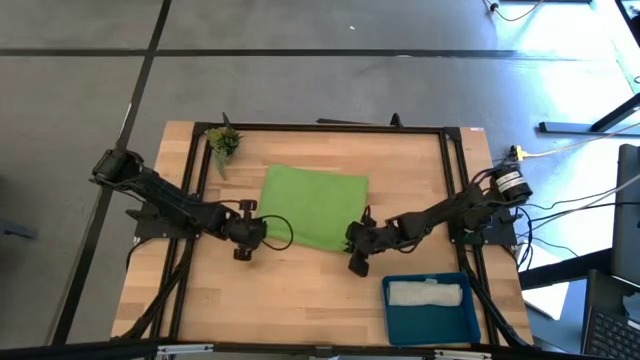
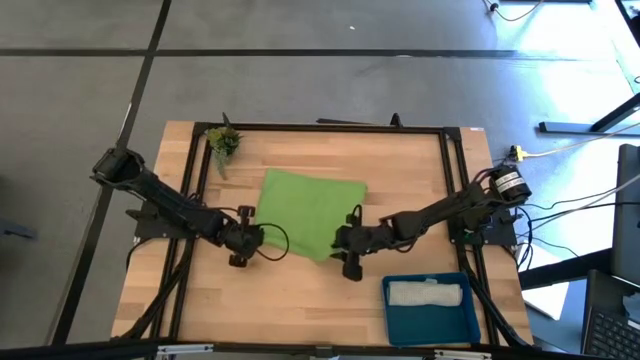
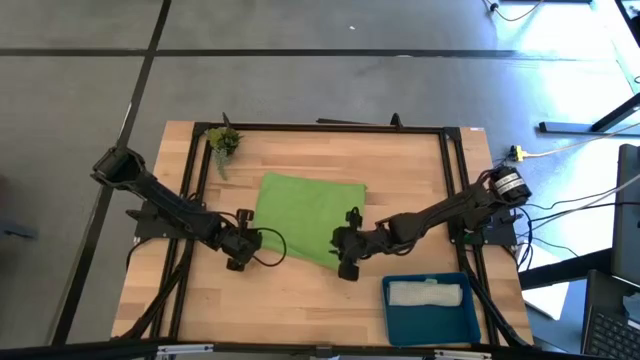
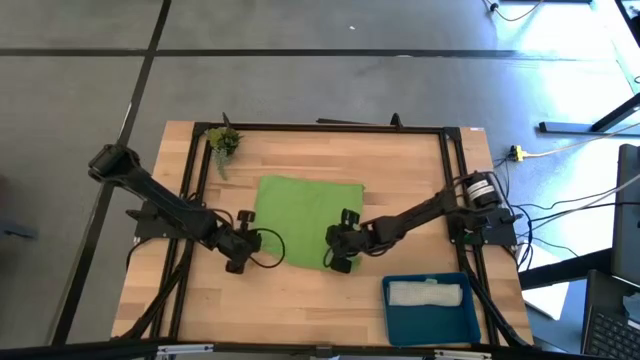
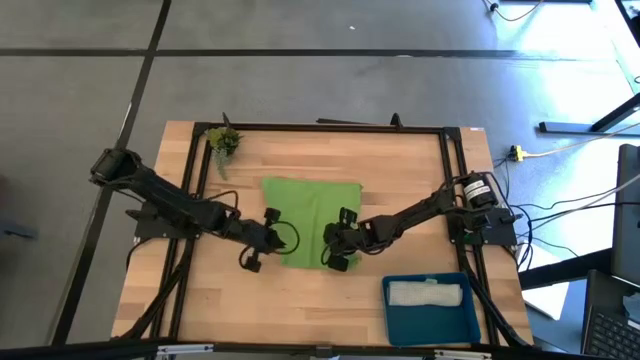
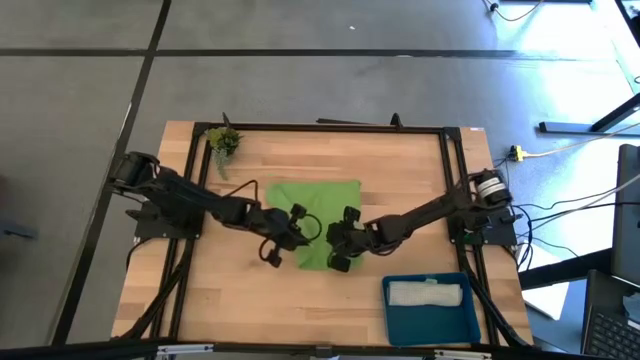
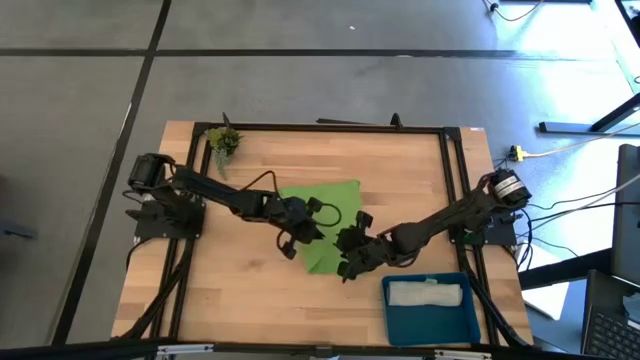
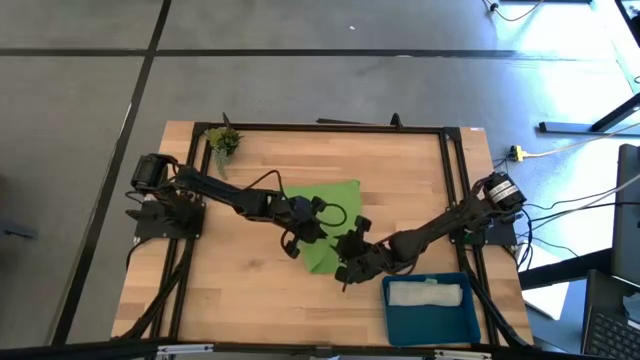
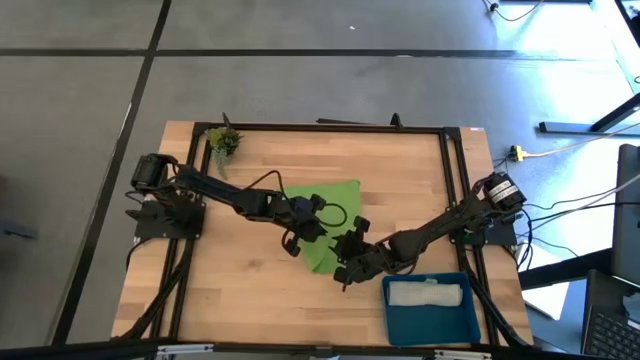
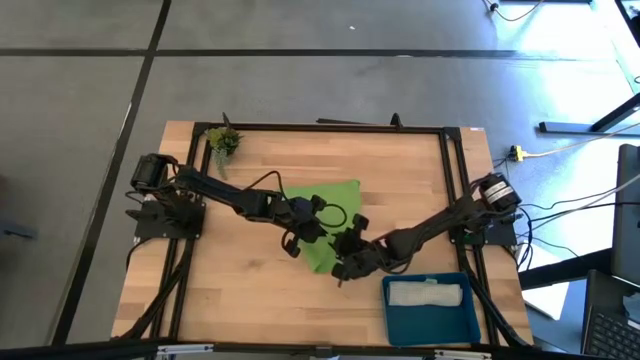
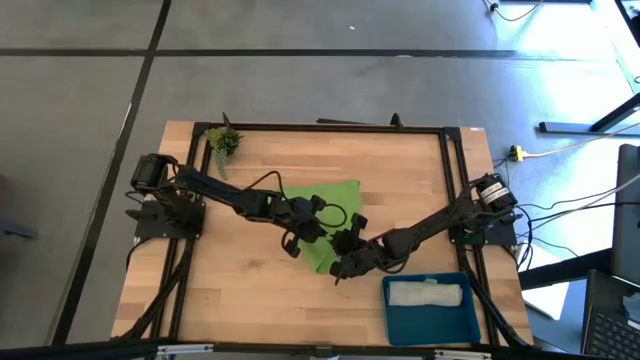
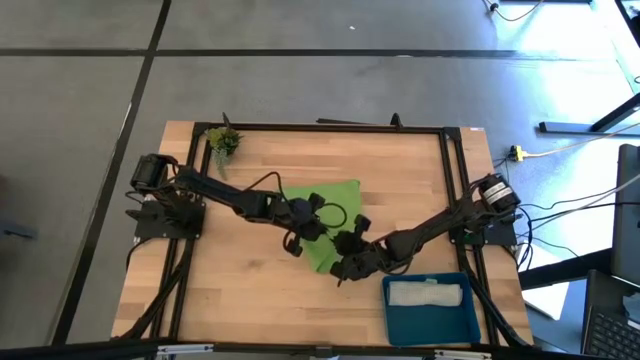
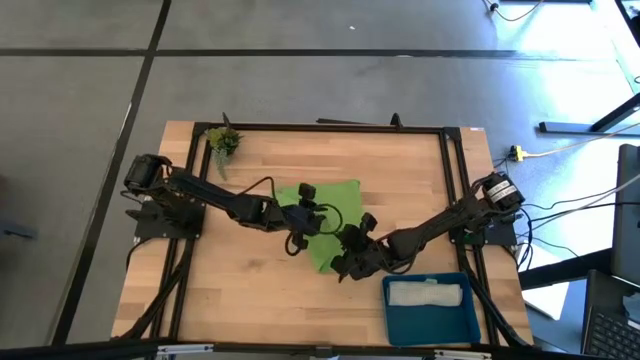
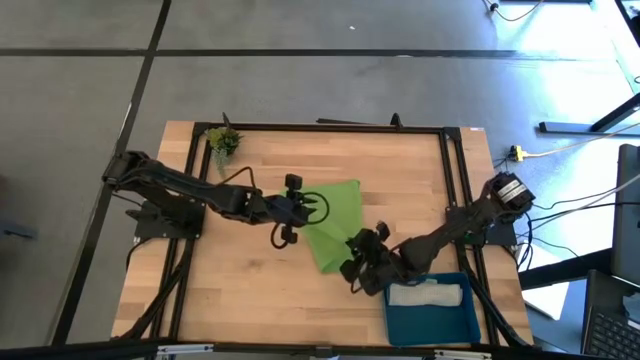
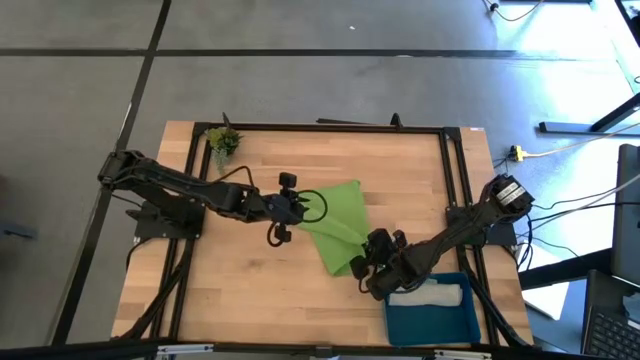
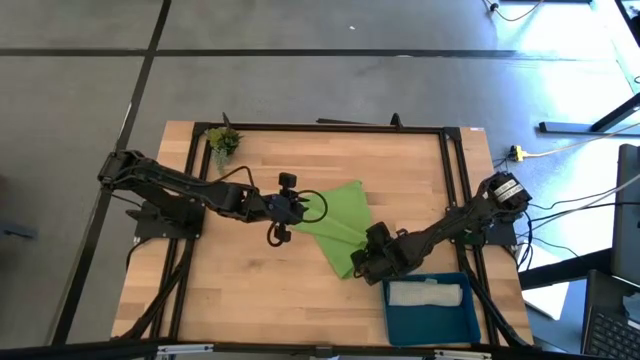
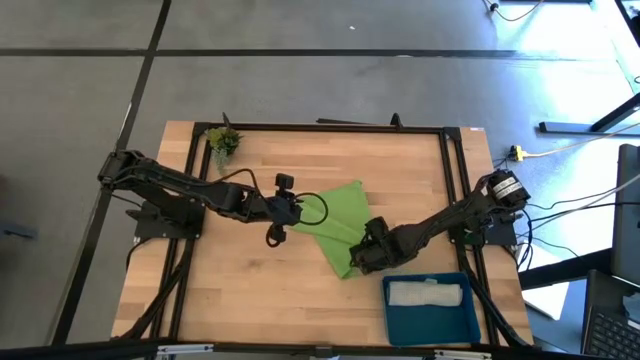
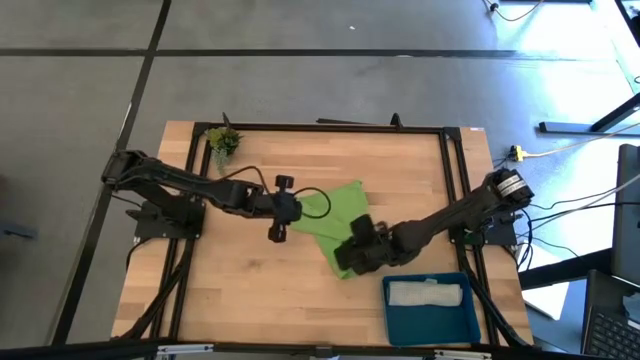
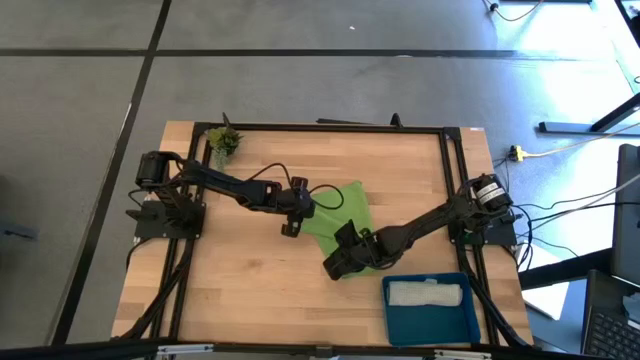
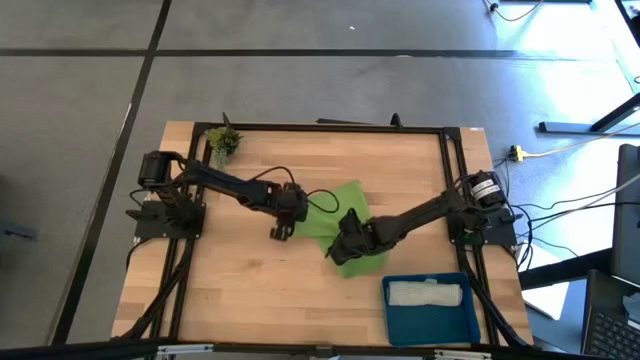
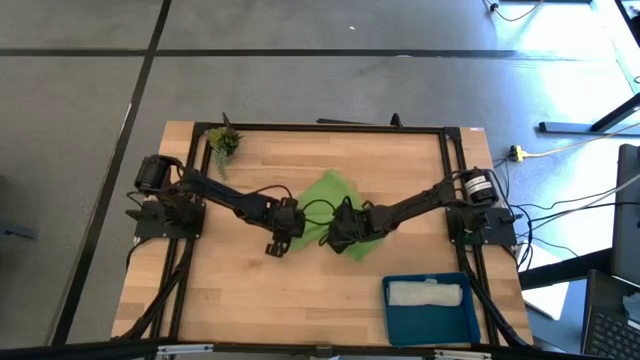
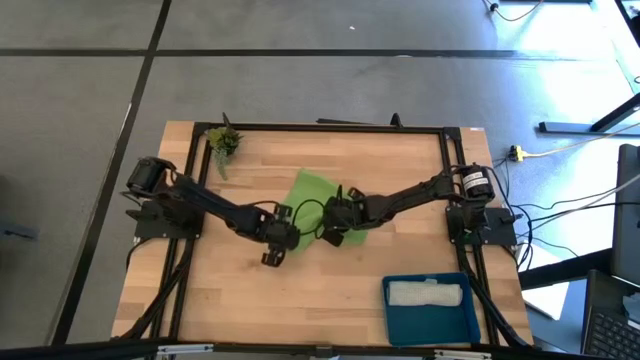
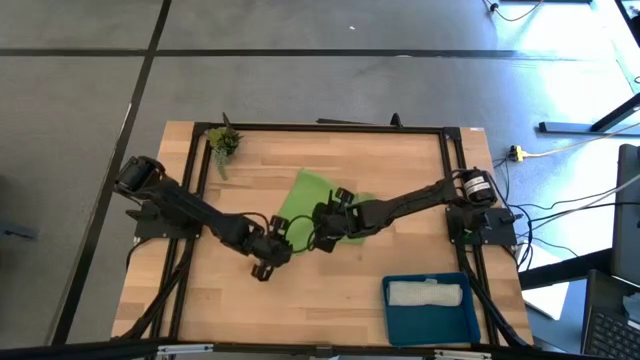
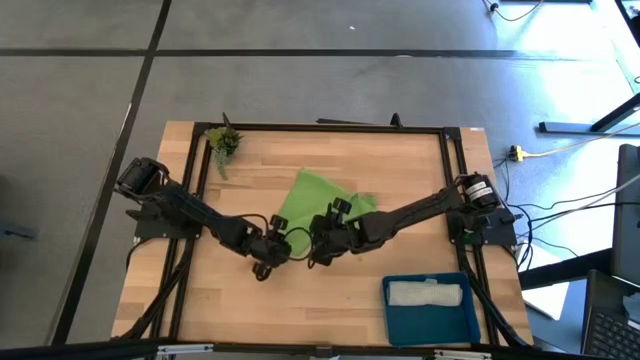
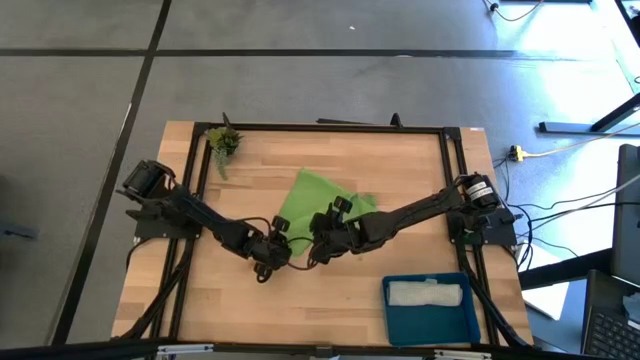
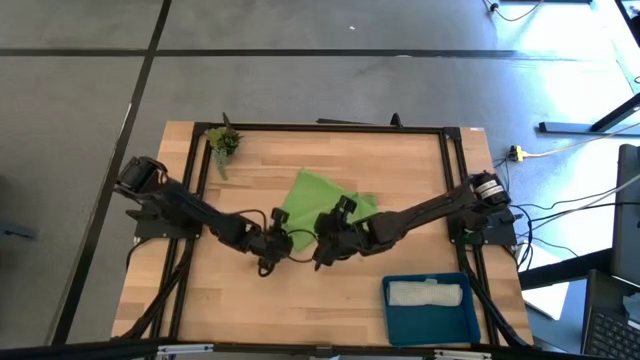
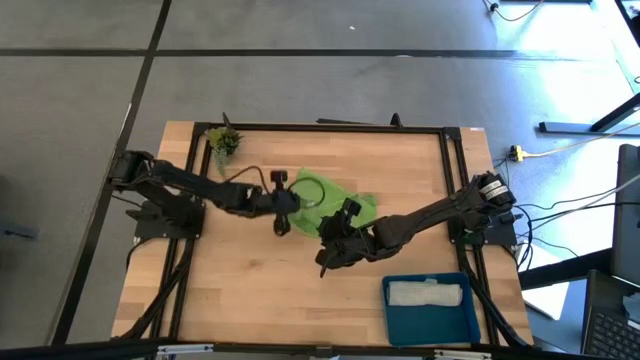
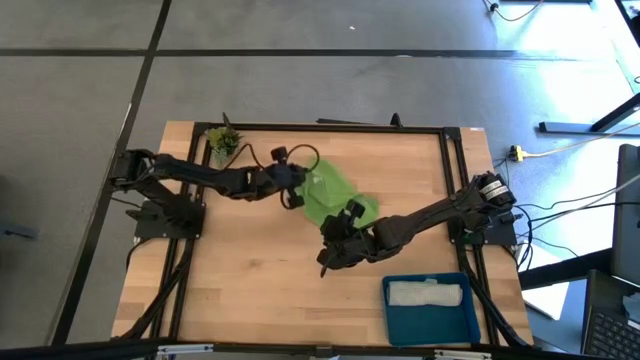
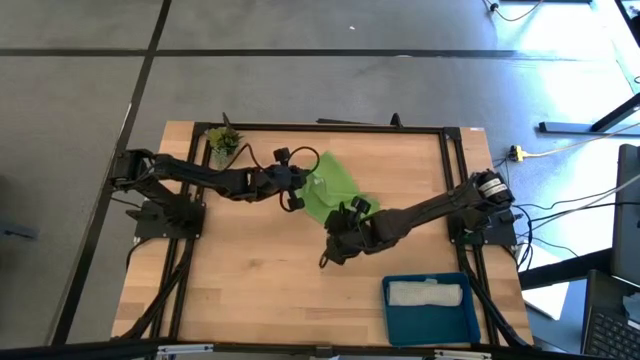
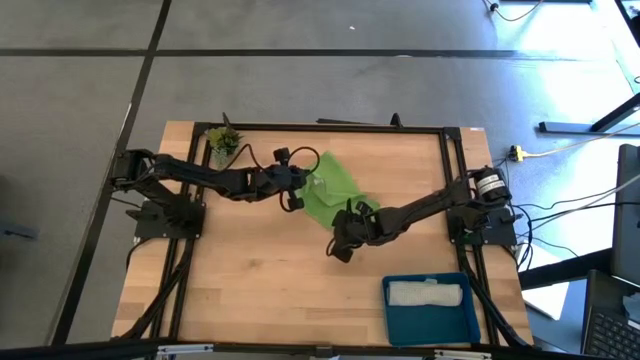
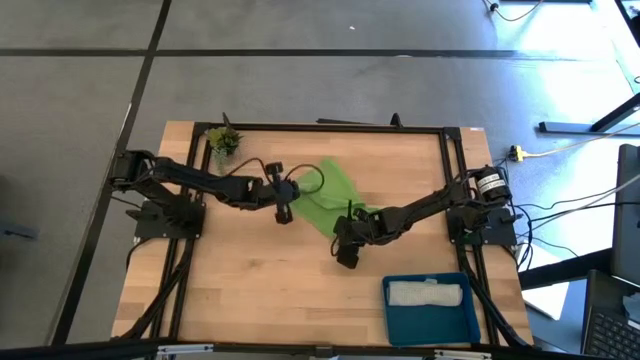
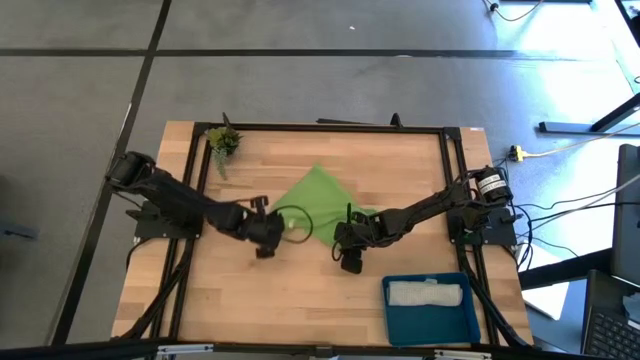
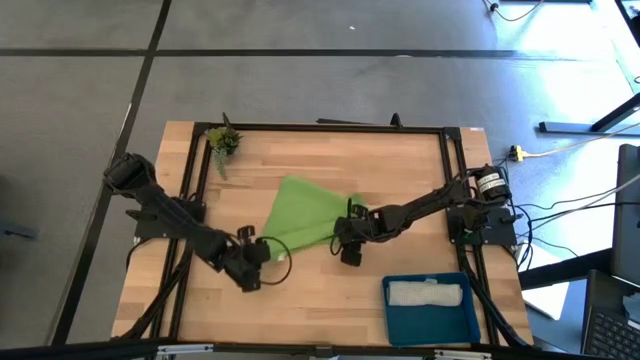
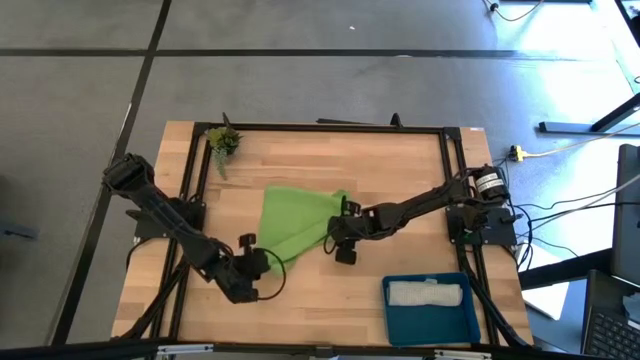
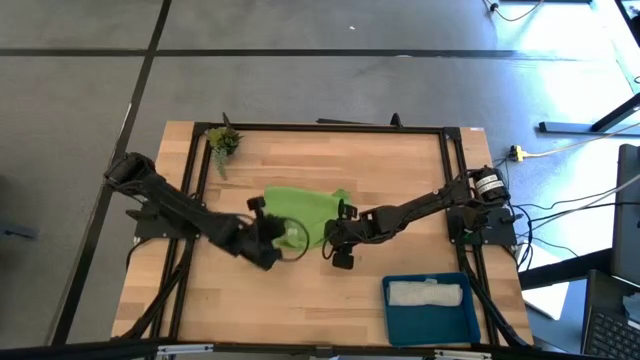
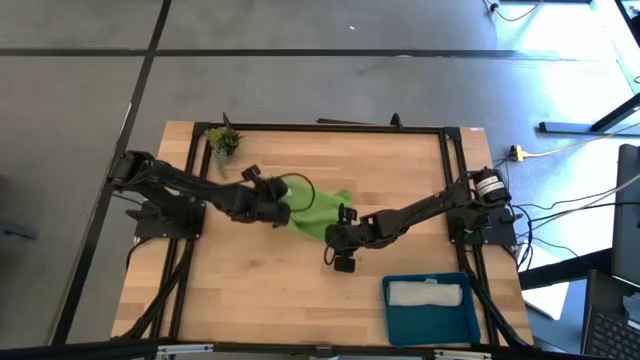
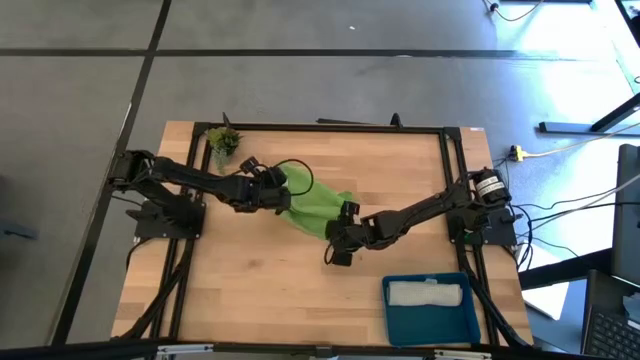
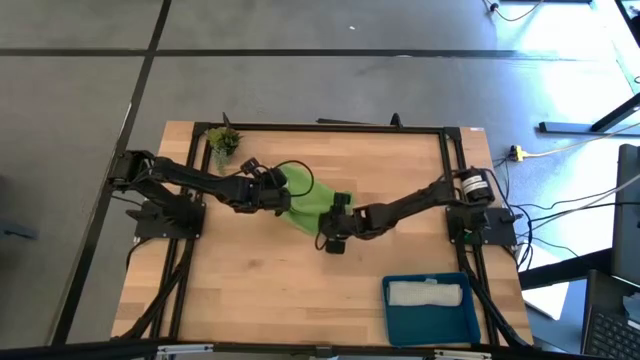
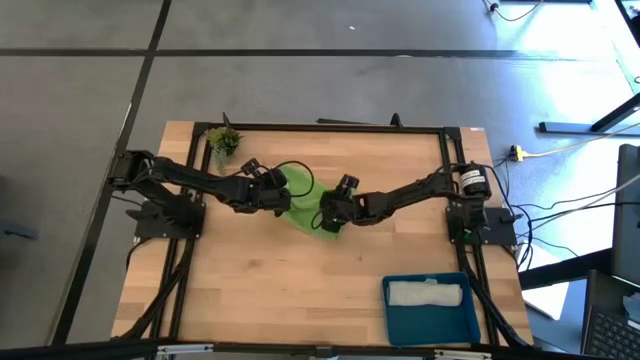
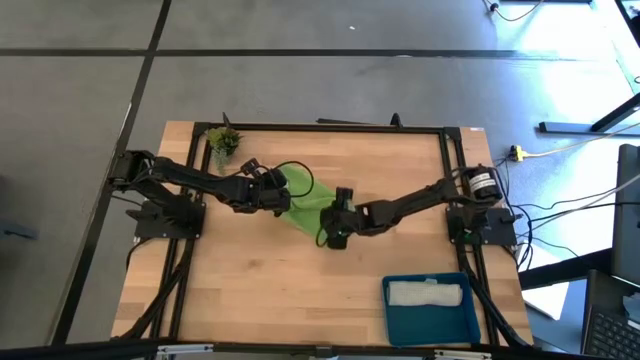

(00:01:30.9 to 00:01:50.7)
Task: Roll microfiber towels into tight, uniform cylinder then place into a basket
Fold the green towel

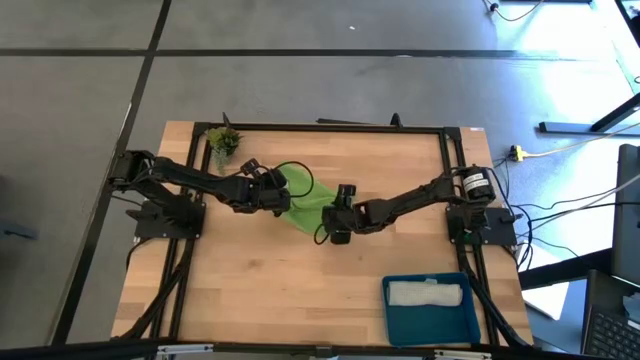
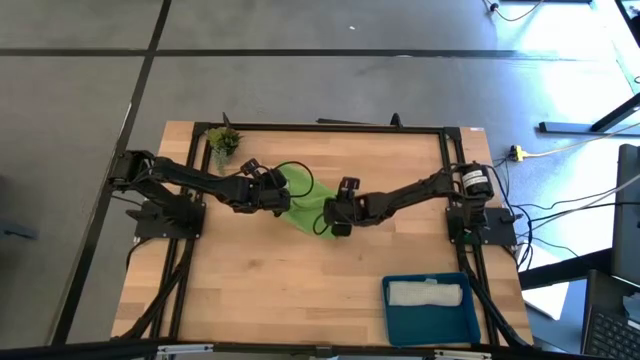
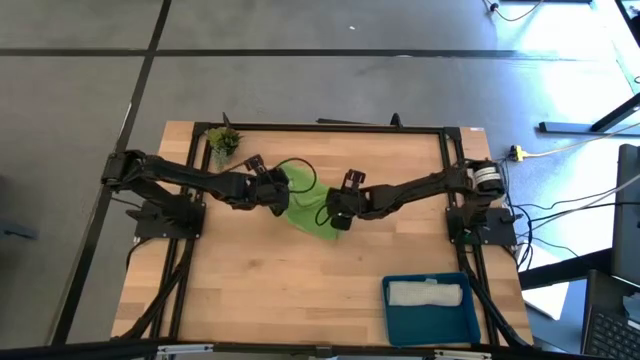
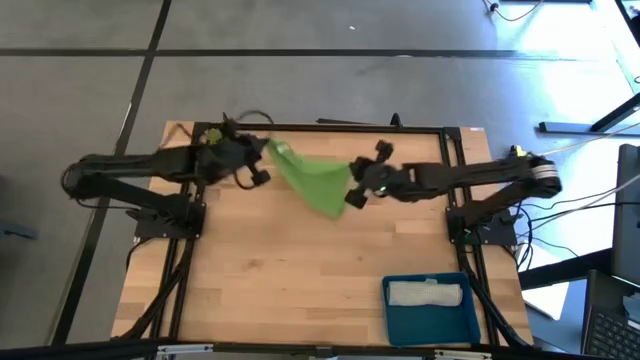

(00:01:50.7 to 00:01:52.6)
Fold the green towel
